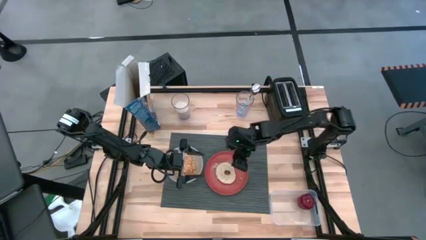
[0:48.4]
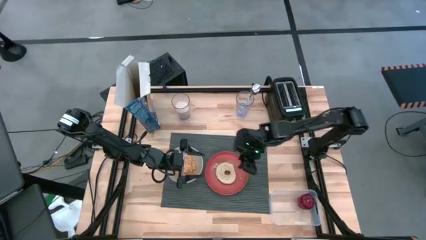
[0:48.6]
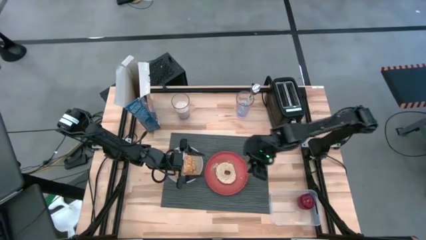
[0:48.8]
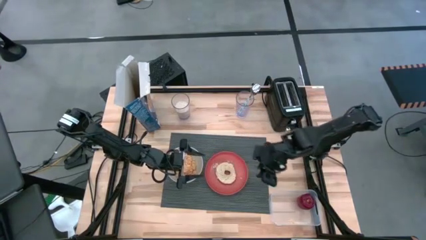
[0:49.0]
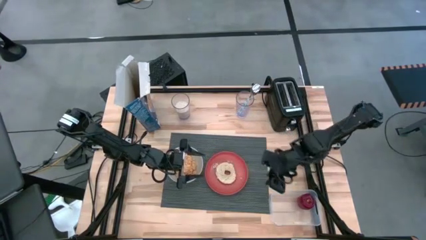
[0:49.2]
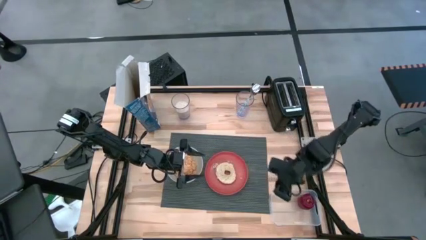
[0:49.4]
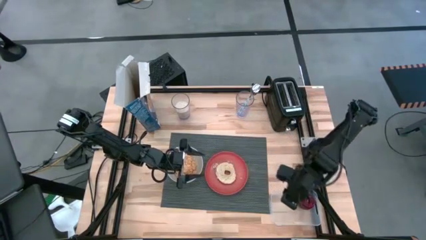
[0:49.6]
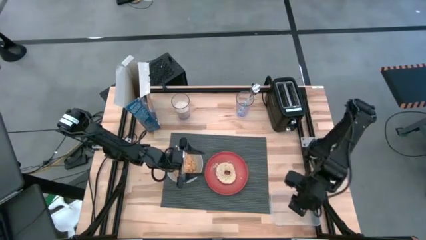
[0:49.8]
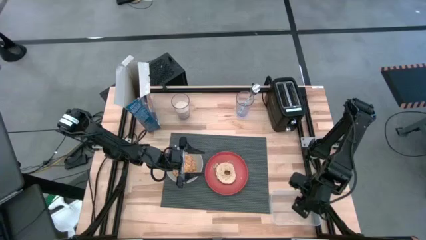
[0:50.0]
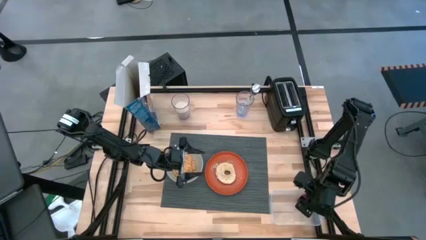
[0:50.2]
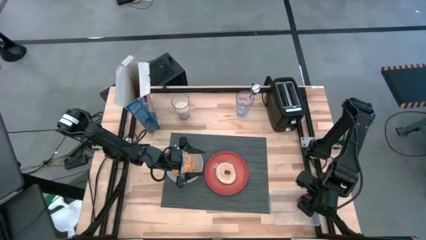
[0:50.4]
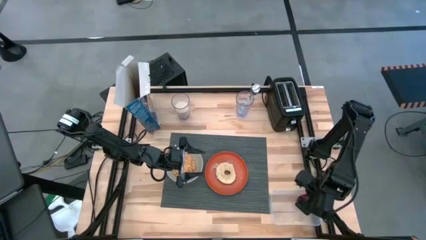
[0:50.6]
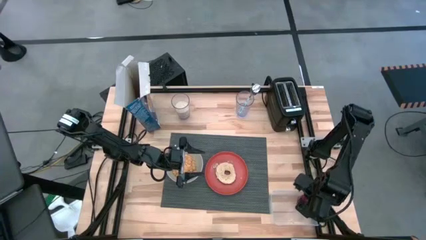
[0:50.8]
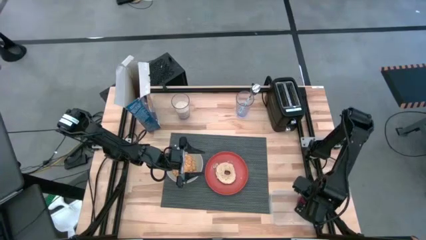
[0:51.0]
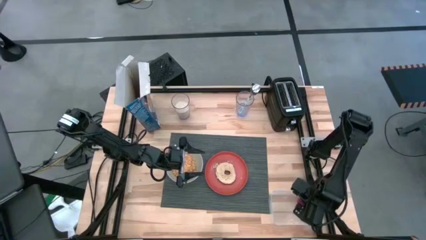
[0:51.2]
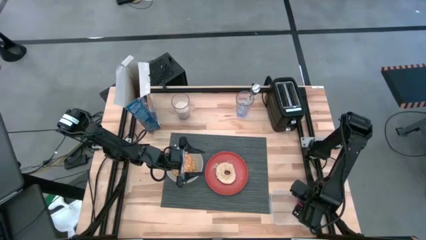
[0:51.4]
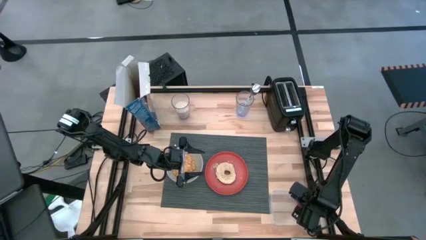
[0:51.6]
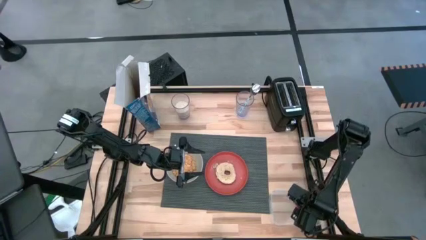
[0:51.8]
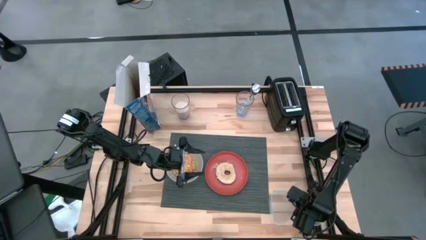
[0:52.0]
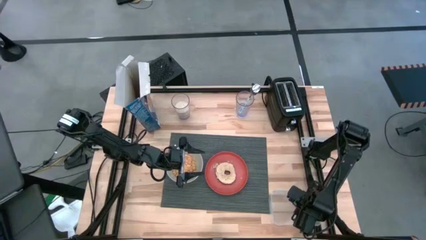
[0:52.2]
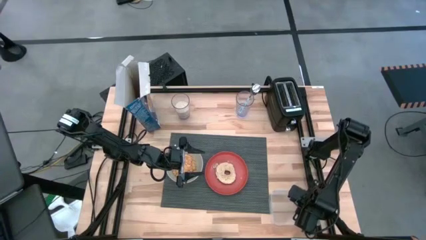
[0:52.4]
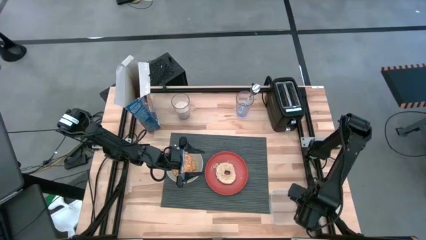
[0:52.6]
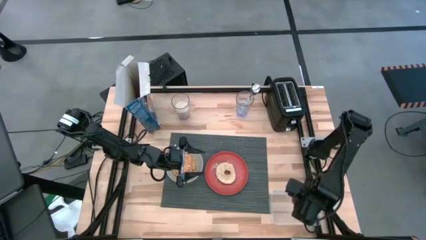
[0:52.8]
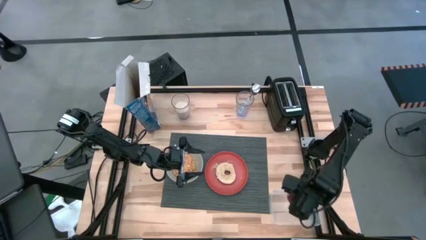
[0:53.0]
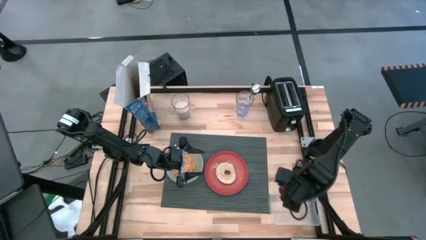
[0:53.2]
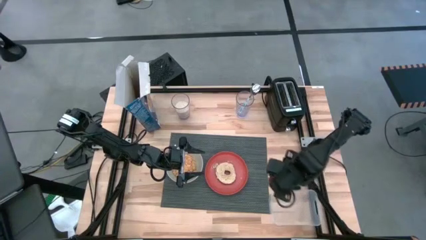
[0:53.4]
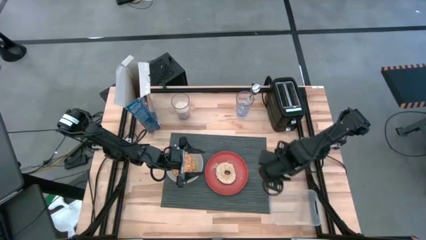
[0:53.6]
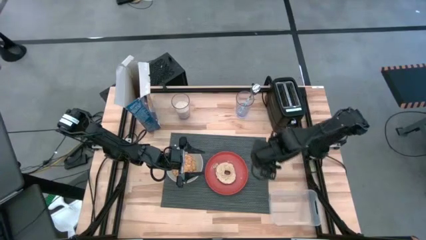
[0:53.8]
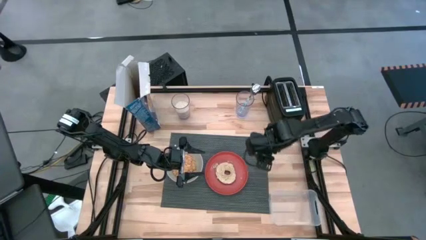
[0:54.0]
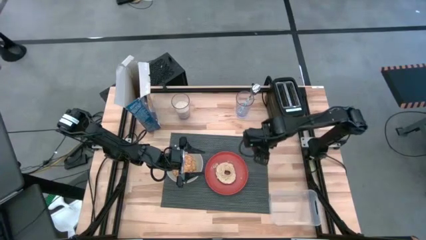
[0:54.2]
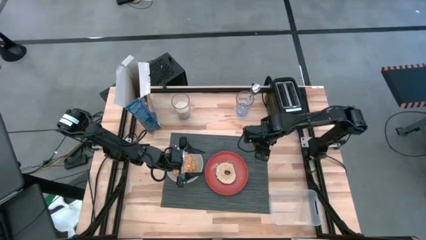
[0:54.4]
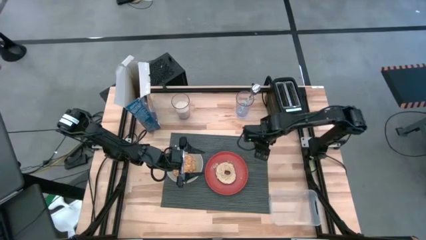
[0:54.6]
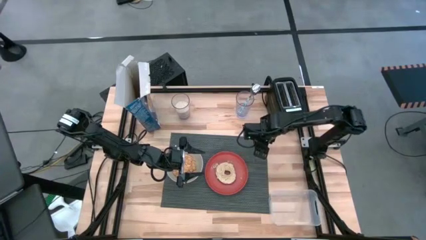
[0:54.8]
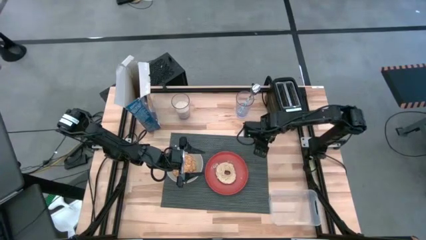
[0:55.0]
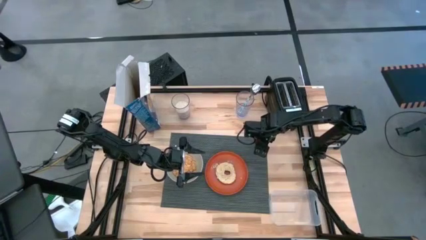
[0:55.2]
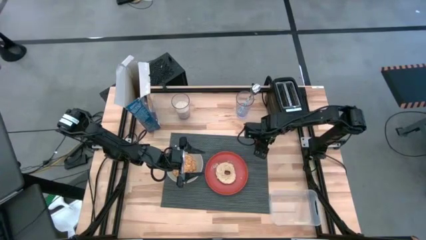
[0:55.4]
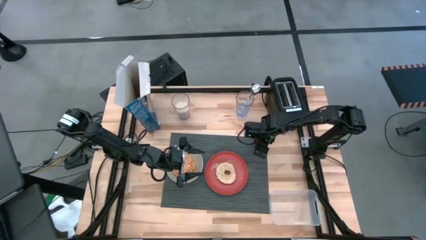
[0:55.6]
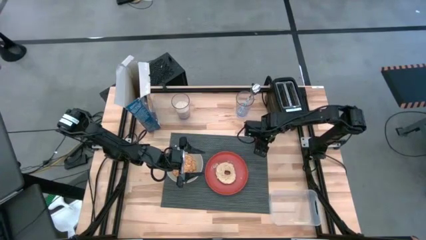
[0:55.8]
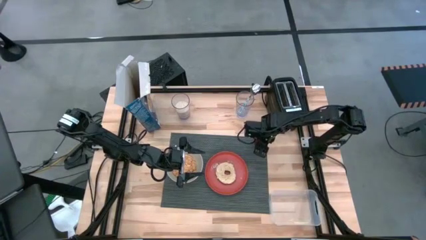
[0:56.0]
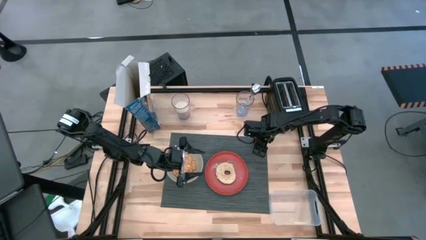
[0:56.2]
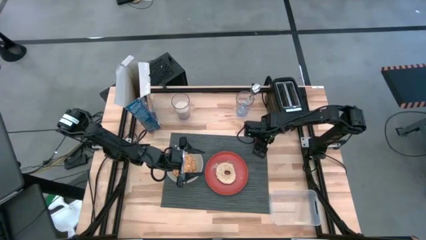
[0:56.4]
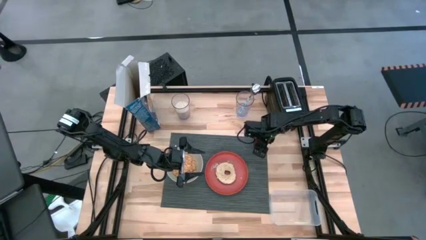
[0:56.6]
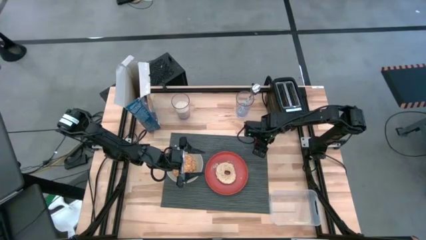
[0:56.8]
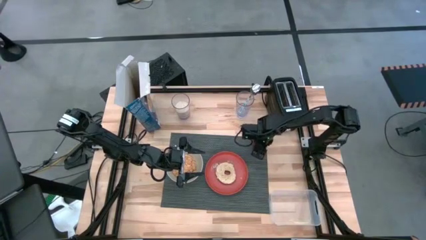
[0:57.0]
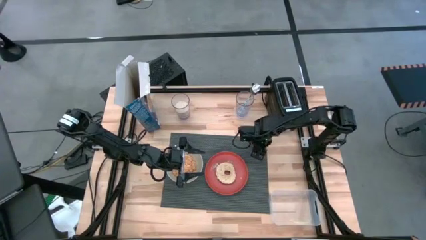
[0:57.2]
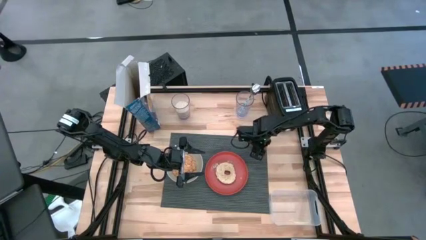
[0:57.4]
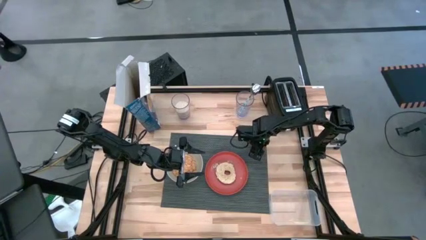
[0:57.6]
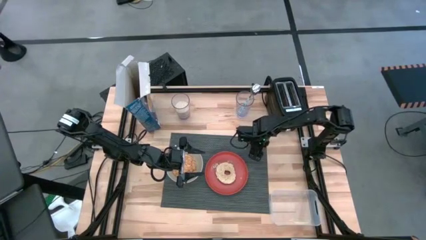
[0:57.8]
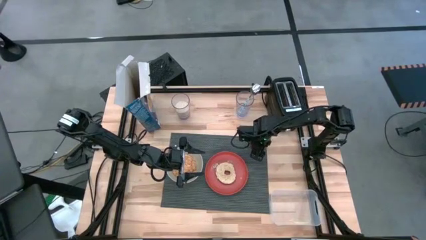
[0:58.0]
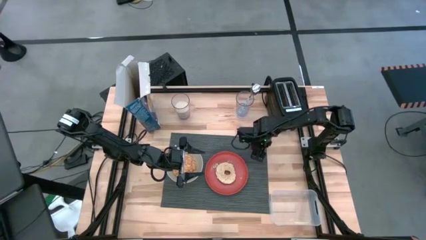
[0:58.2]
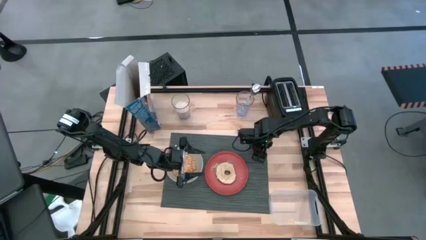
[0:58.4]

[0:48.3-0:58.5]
Task: Arrange a breakfast setting
Put the apple on the top right side of the table mat

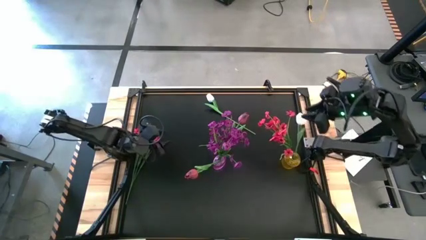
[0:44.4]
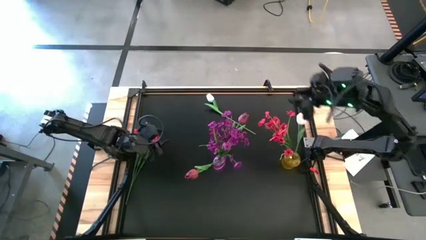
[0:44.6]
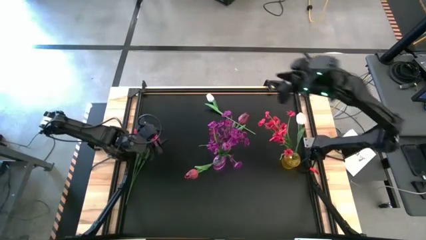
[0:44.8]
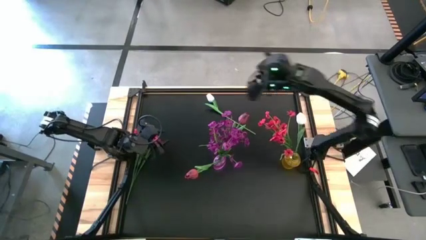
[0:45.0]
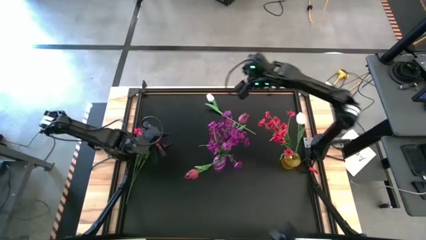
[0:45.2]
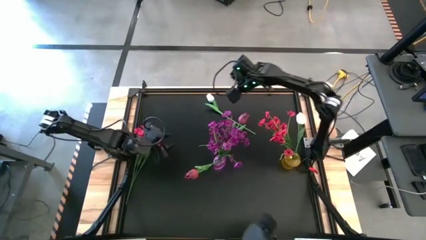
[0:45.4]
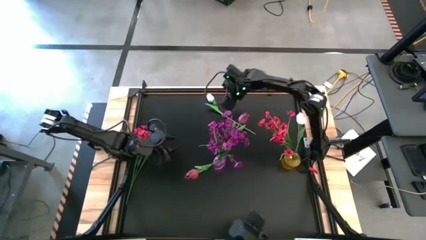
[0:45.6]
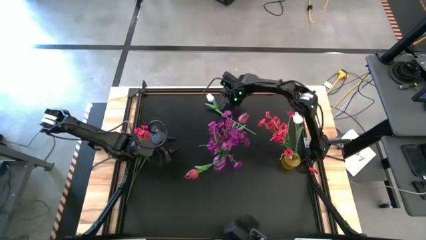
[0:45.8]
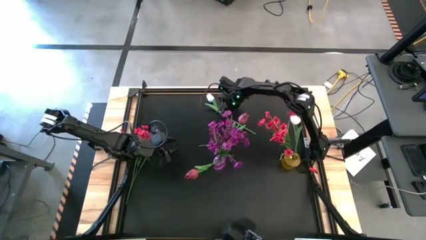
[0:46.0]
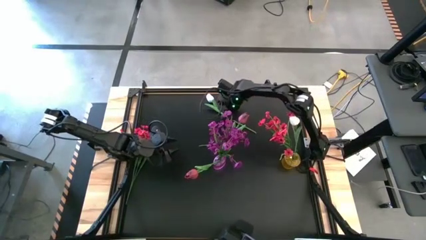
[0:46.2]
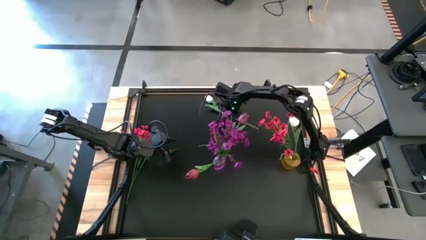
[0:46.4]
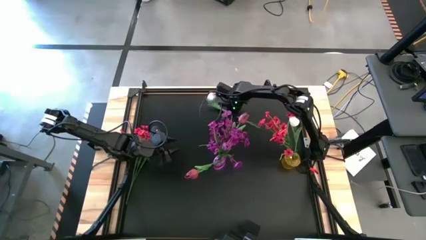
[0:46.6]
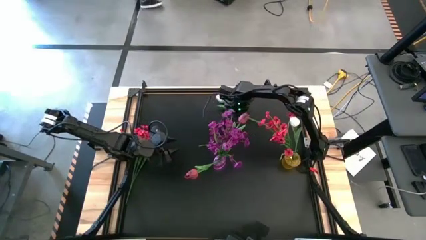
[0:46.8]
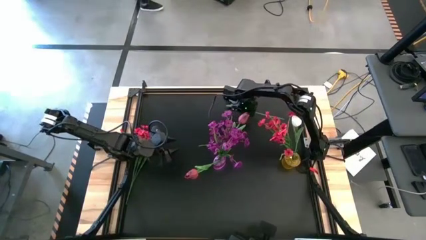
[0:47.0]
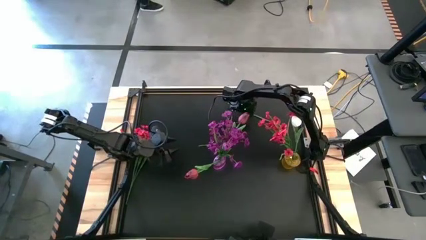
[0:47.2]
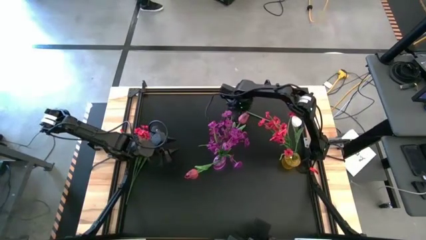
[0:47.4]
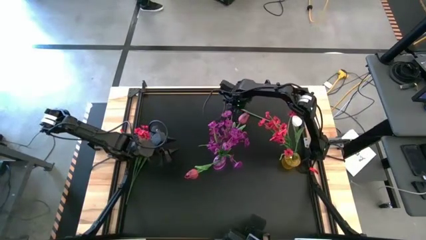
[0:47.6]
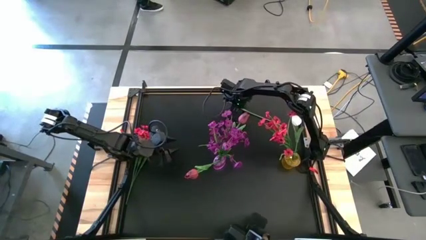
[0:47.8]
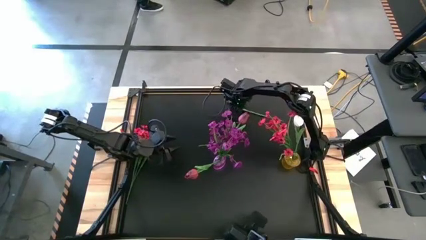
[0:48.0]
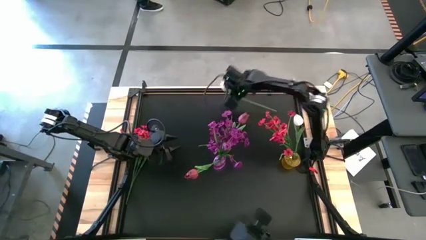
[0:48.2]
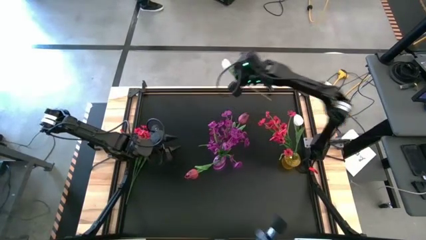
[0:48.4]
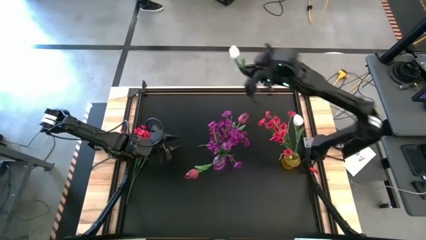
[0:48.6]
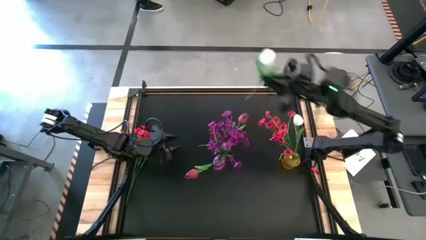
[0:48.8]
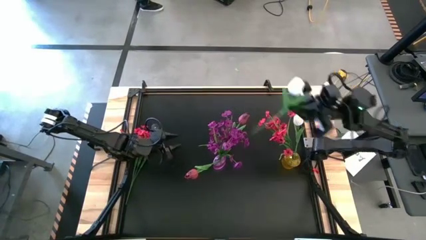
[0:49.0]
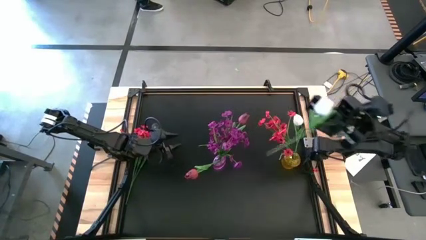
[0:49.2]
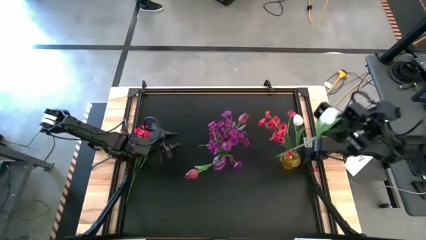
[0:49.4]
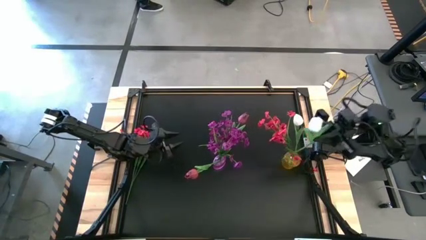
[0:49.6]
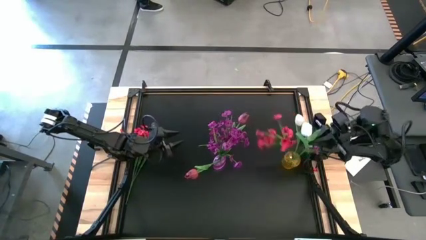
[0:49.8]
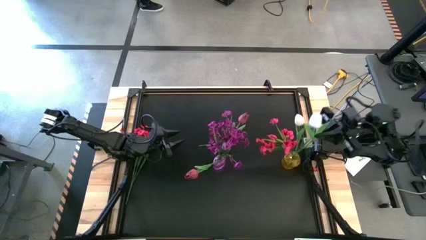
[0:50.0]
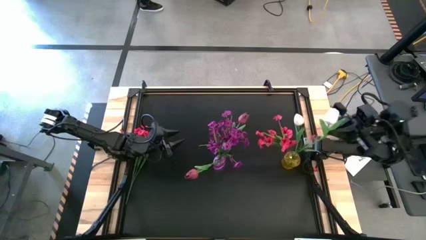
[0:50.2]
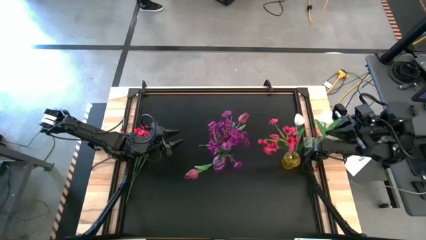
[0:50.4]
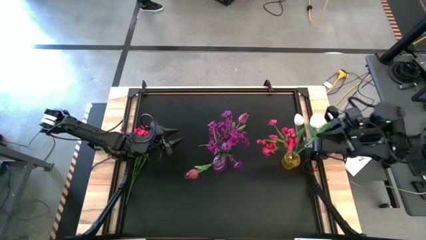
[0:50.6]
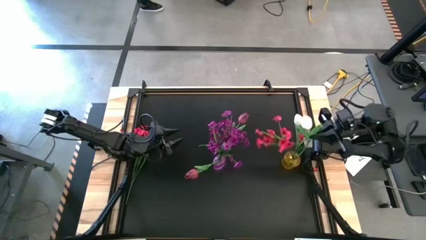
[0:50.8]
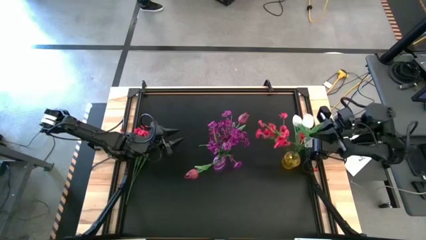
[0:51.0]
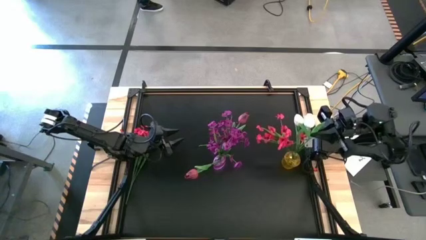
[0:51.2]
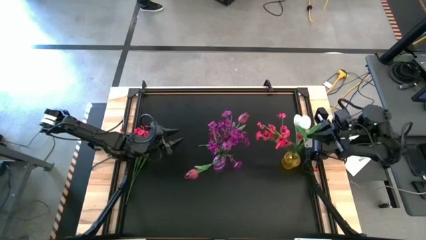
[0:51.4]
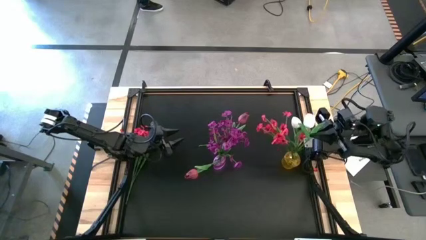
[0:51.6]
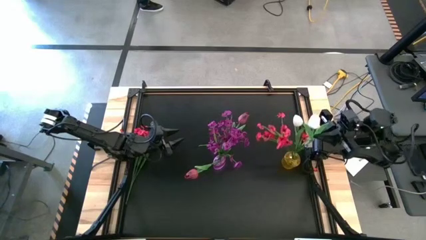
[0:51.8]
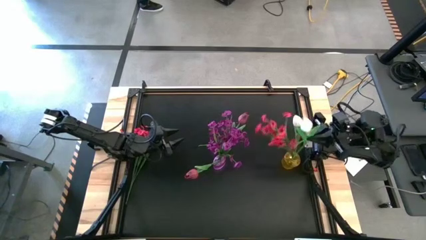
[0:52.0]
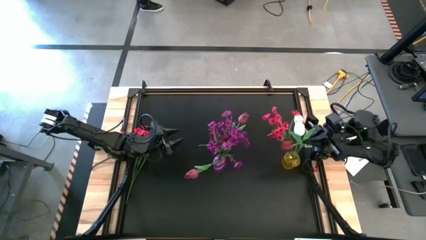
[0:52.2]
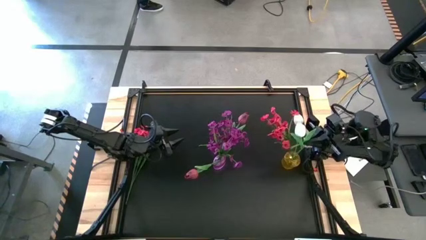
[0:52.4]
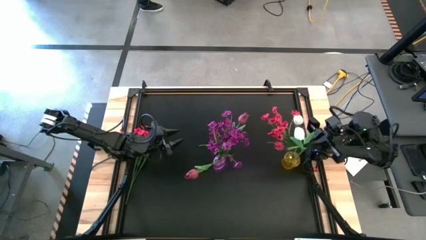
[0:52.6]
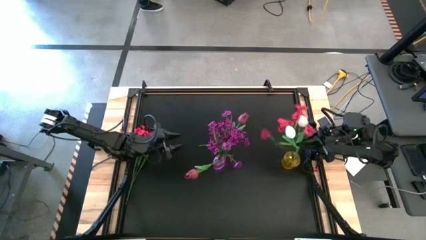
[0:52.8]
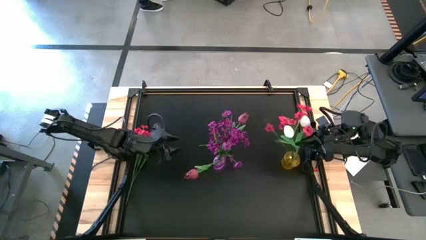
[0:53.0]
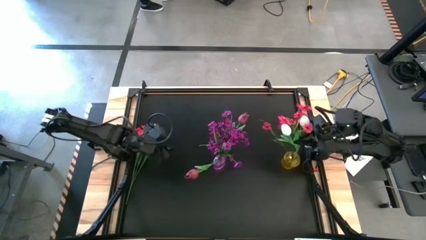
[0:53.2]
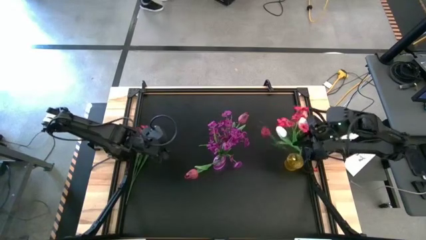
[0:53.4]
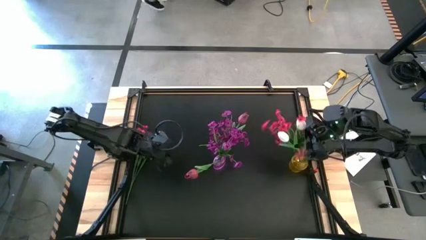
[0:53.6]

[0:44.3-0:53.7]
Task: Sort flowers into vase by color
Put the white flower into the yellow vase
